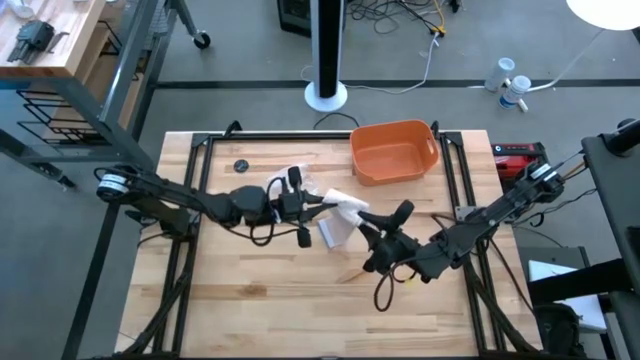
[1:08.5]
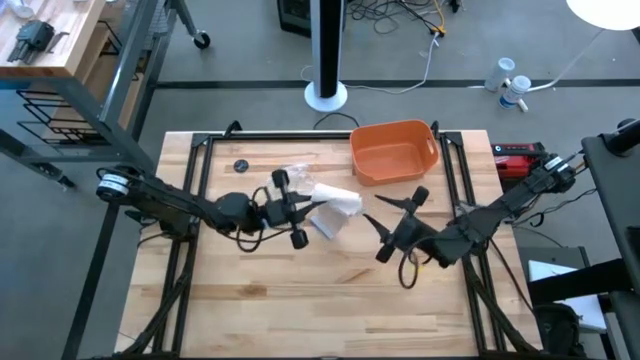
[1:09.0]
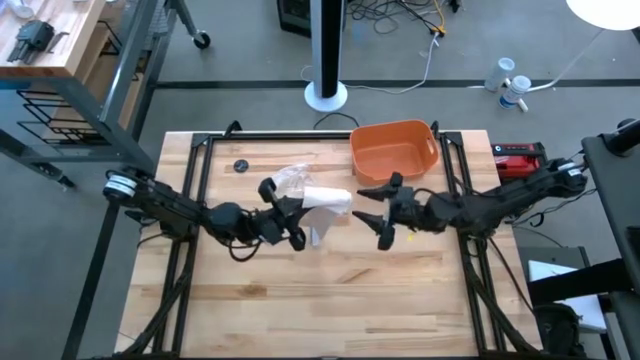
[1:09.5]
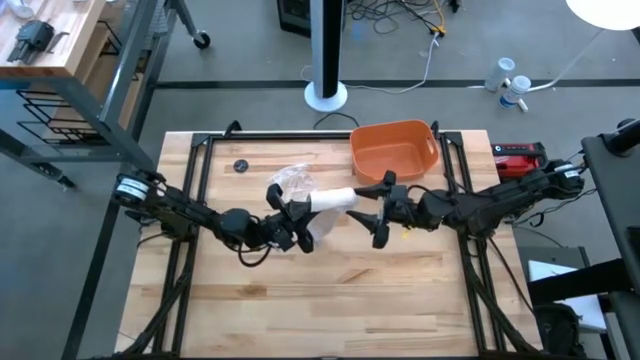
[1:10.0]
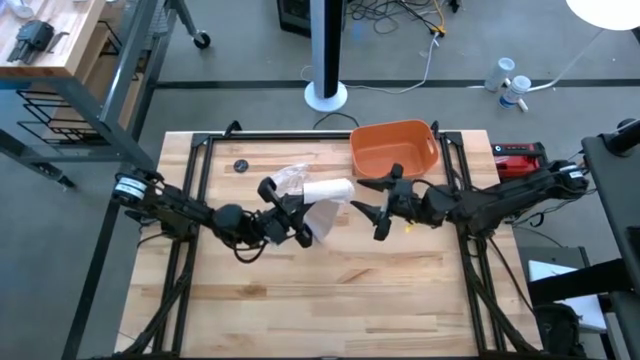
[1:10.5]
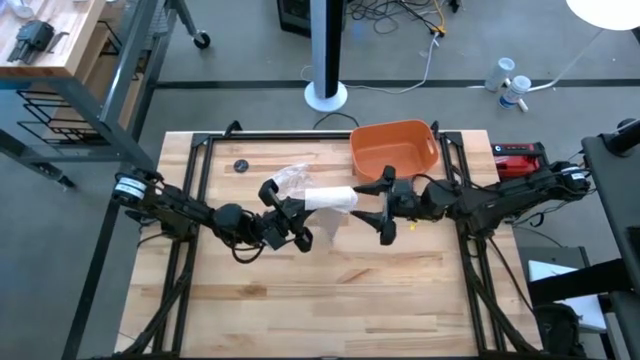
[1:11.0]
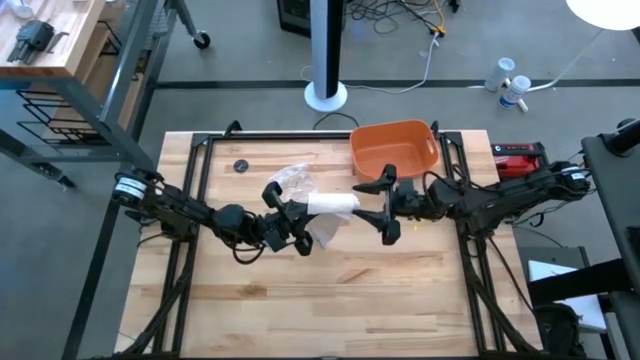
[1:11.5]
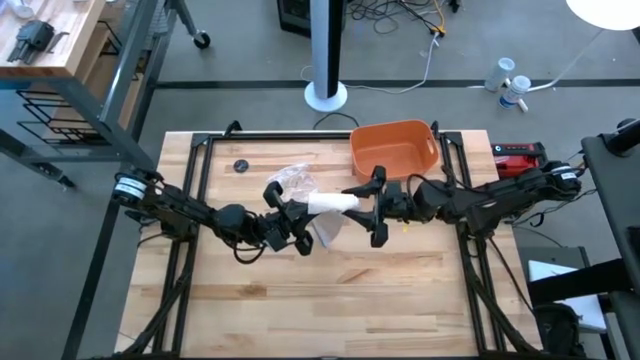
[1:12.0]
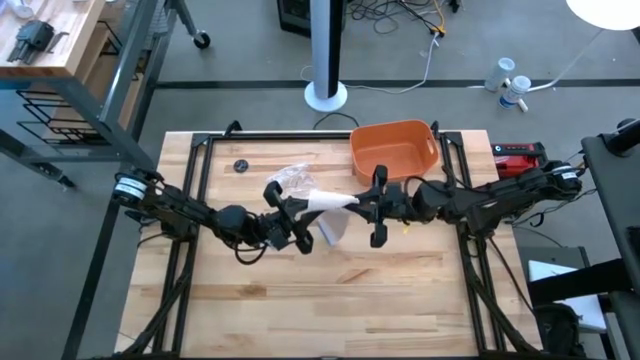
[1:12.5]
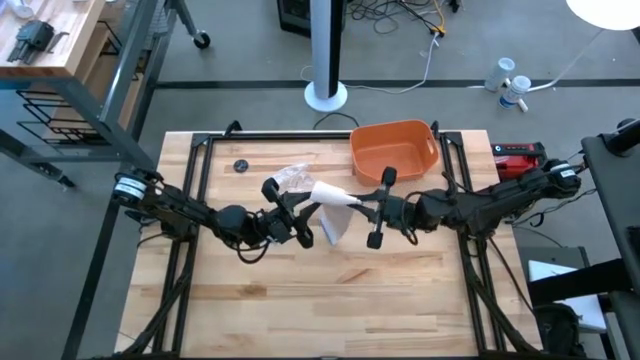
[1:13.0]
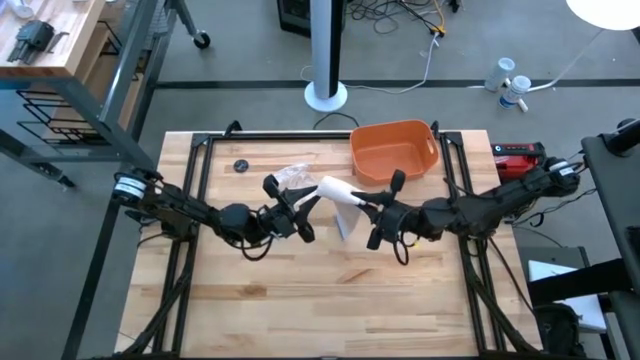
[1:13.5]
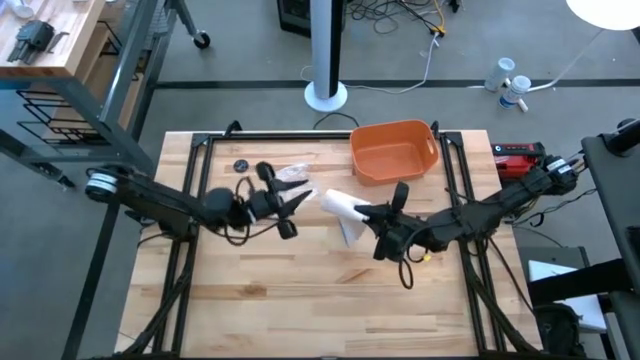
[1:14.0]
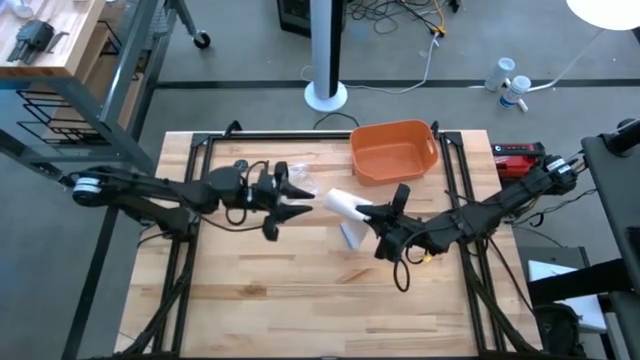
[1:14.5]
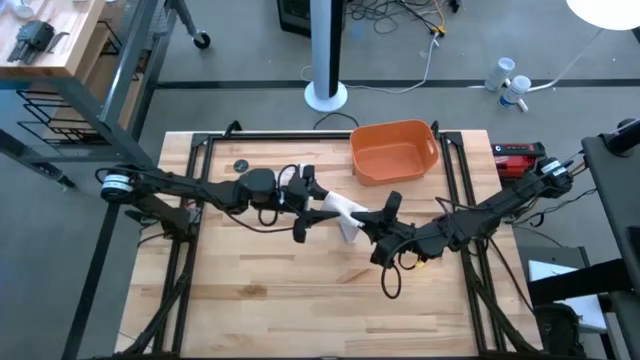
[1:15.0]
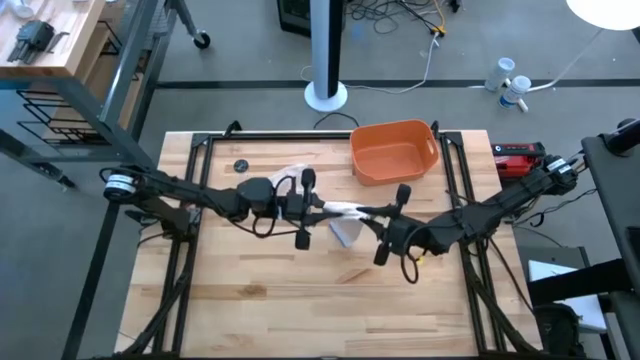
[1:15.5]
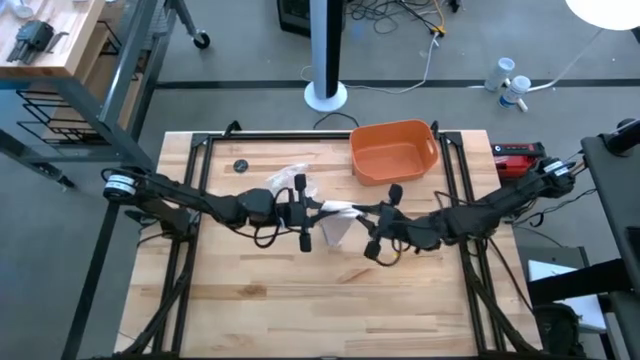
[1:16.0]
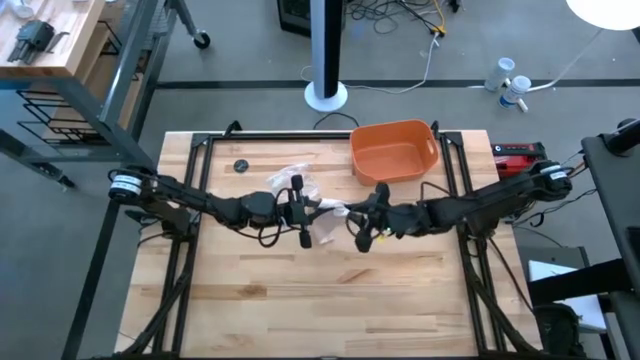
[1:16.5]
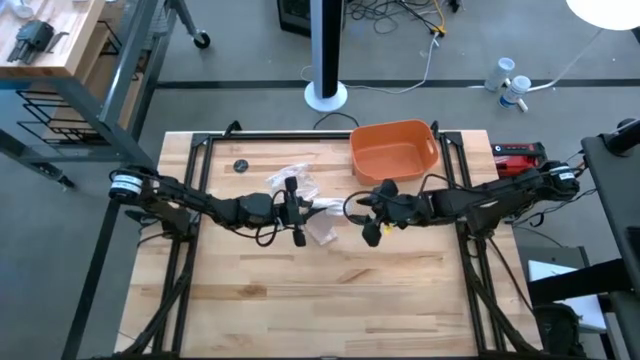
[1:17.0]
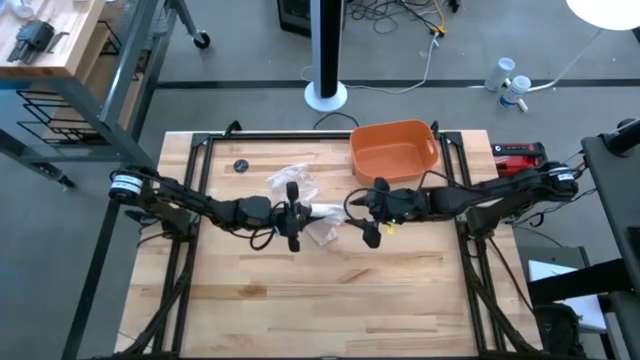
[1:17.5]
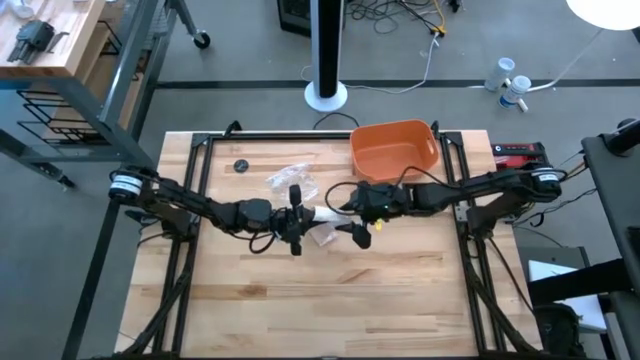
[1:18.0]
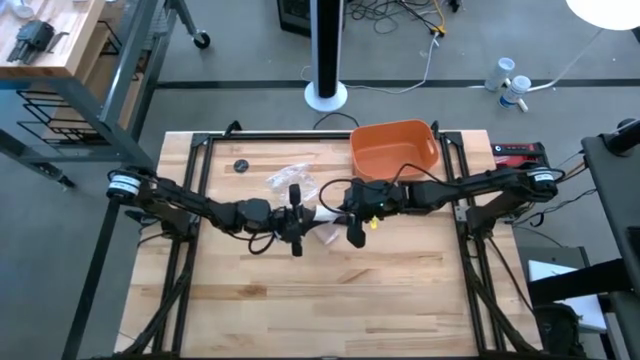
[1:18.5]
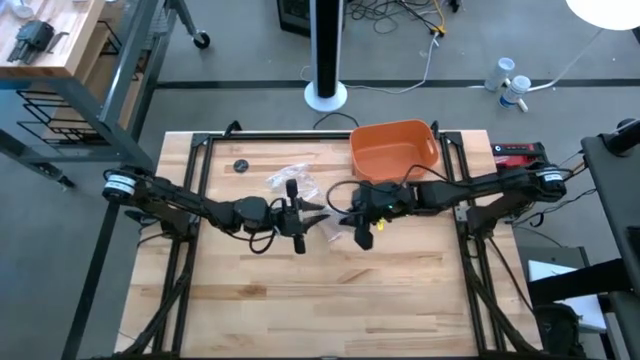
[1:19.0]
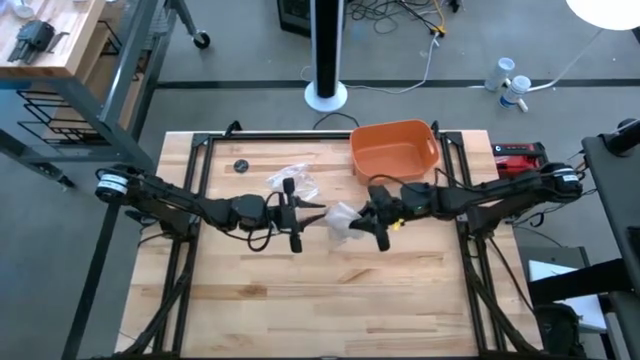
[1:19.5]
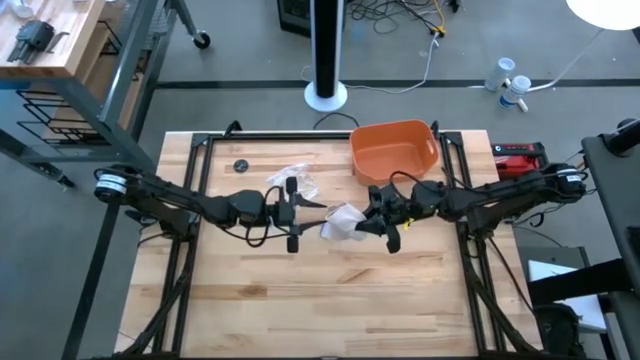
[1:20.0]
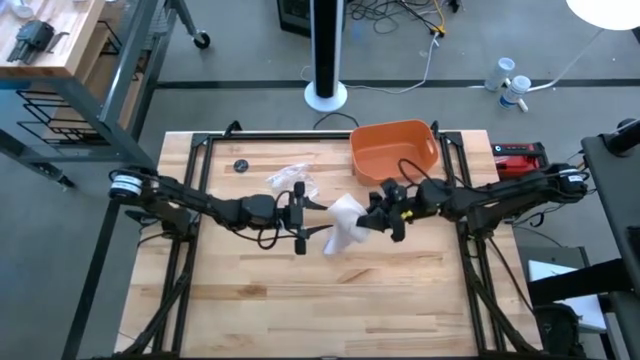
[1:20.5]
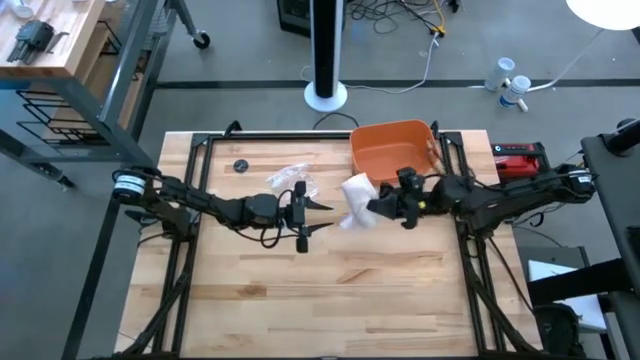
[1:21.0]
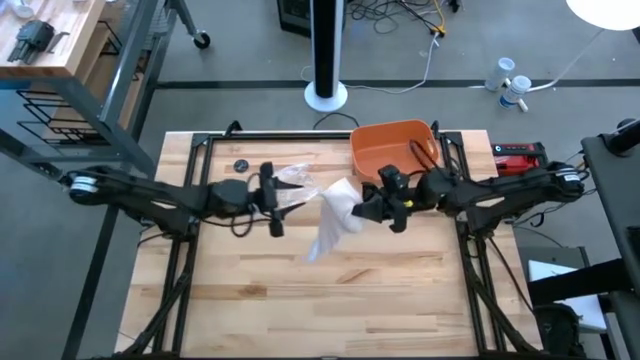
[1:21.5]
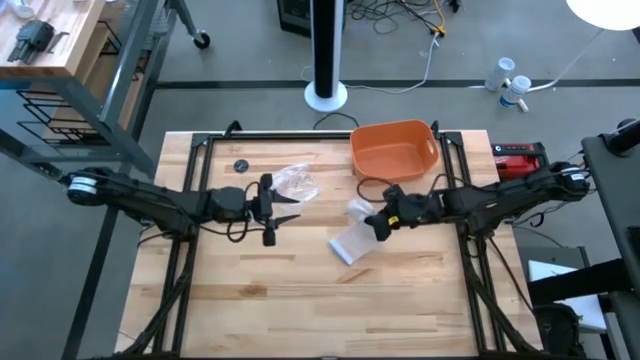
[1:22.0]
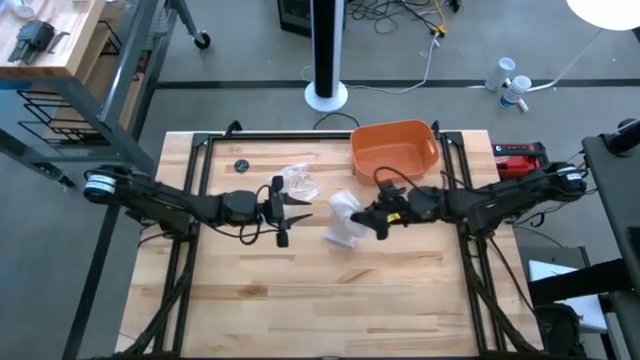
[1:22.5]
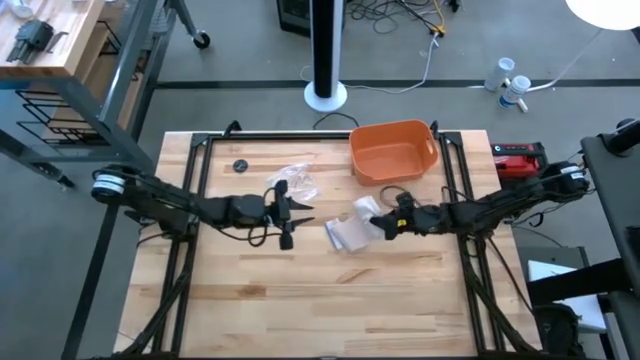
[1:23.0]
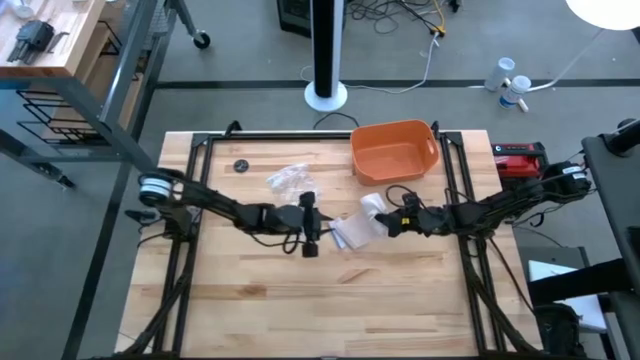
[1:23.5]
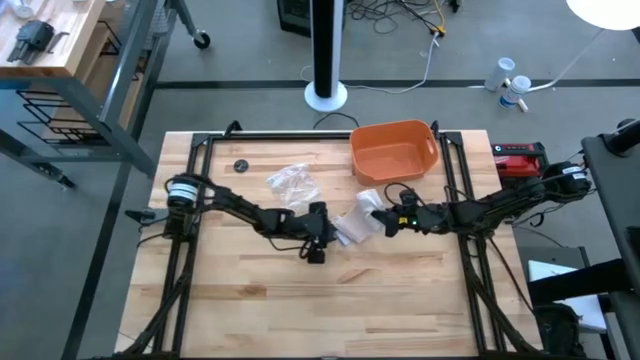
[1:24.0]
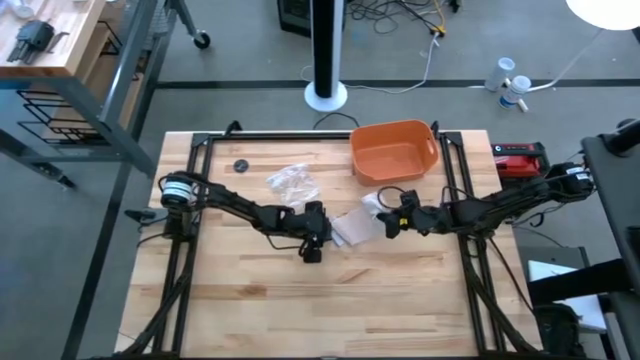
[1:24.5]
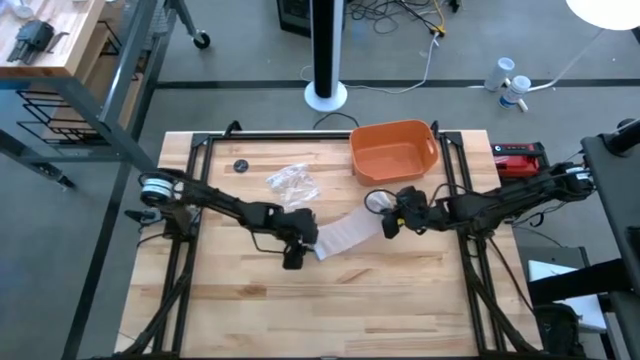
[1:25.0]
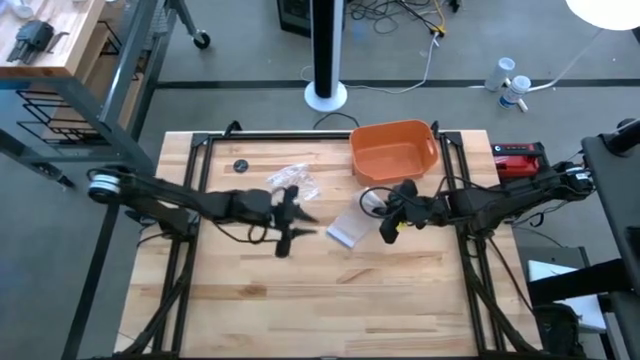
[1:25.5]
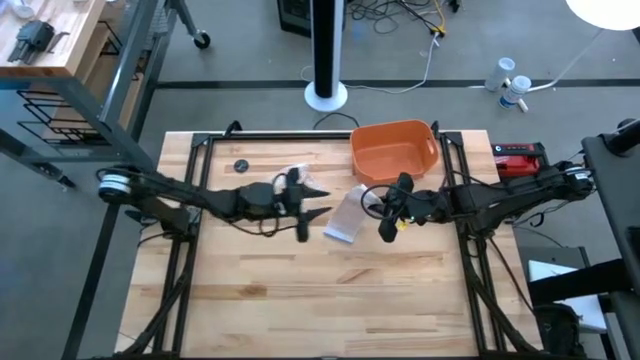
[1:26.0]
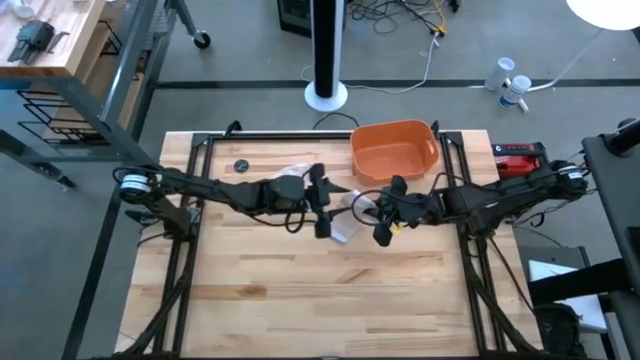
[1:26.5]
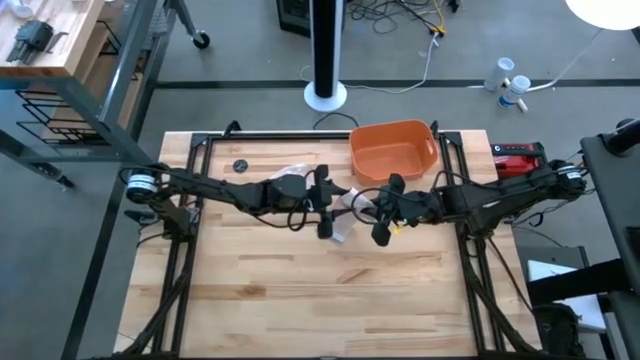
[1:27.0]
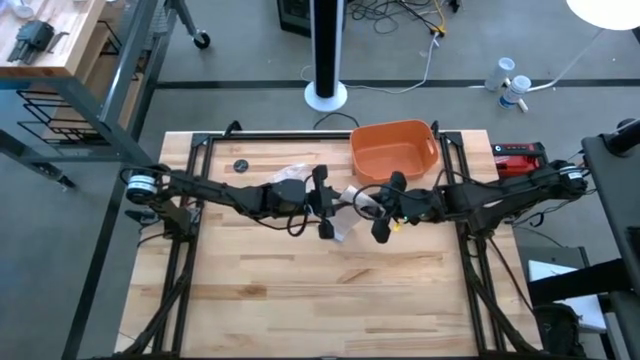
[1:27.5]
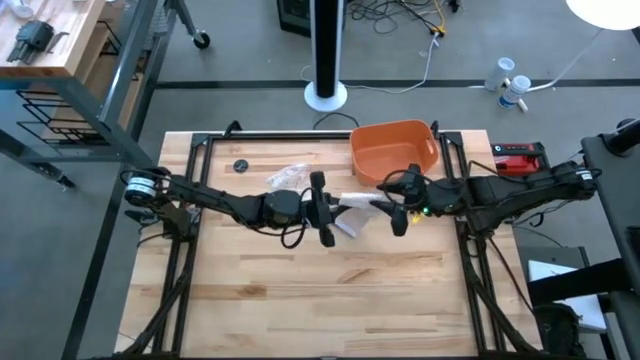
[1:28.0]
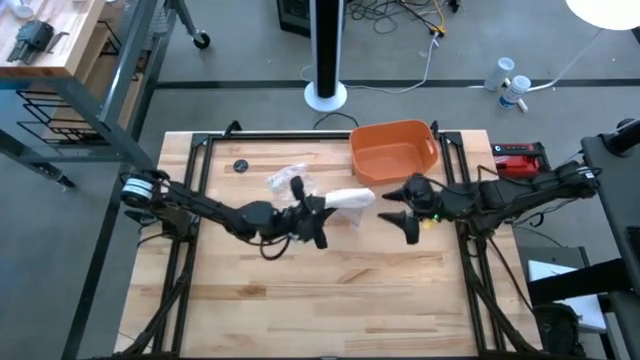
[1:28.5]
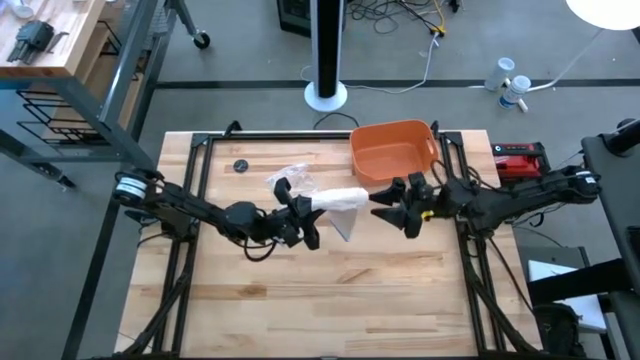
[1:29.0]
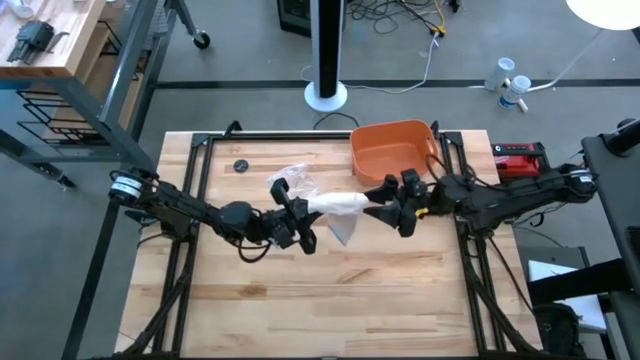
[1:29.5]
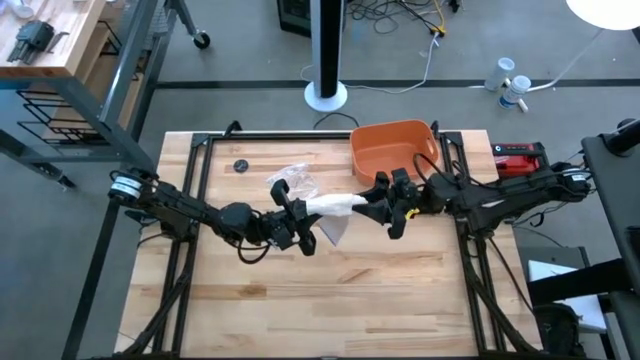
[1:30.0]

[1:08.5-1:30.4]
Task: Roll bandage
Roll the brown bandage
